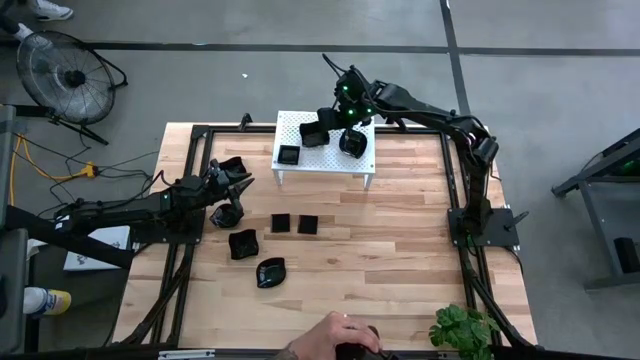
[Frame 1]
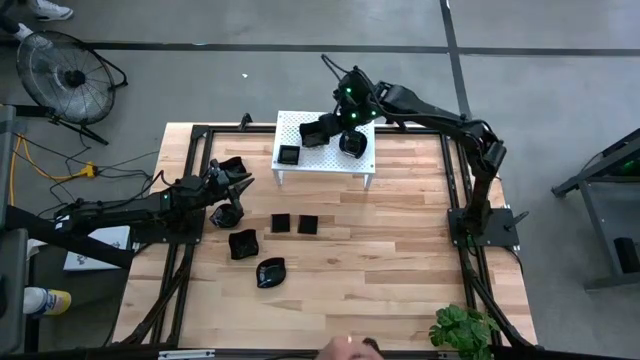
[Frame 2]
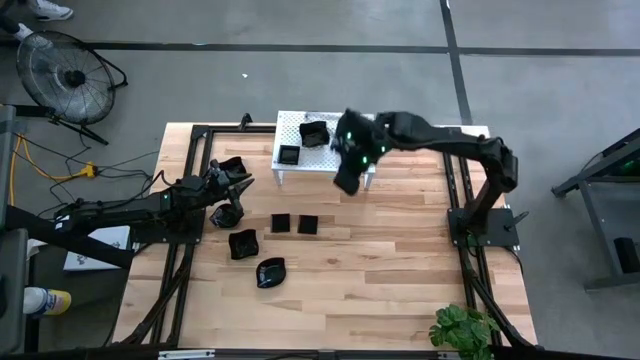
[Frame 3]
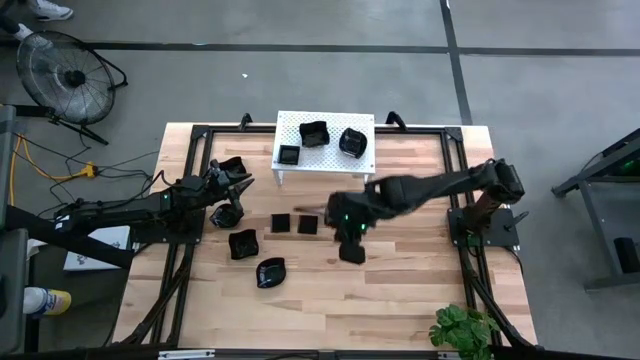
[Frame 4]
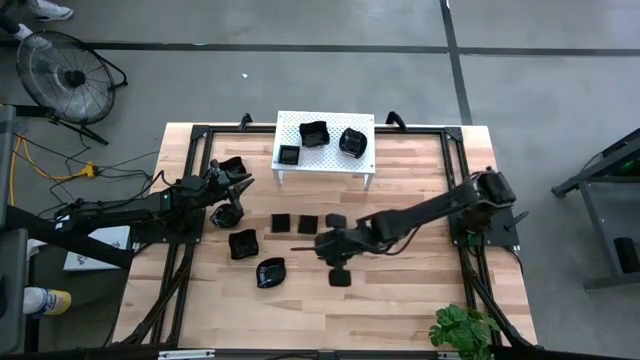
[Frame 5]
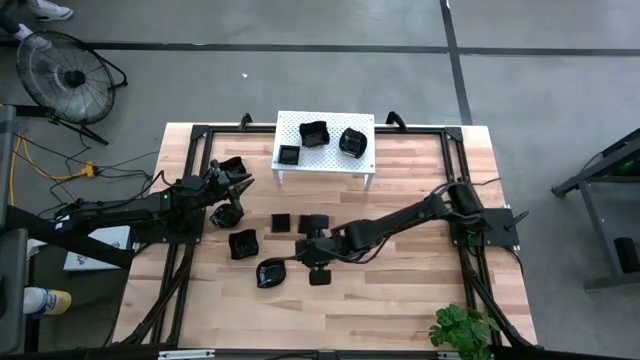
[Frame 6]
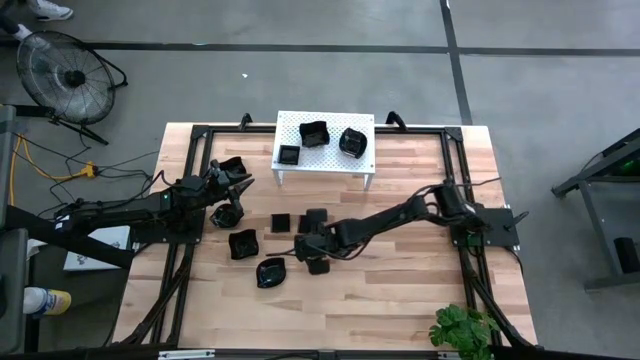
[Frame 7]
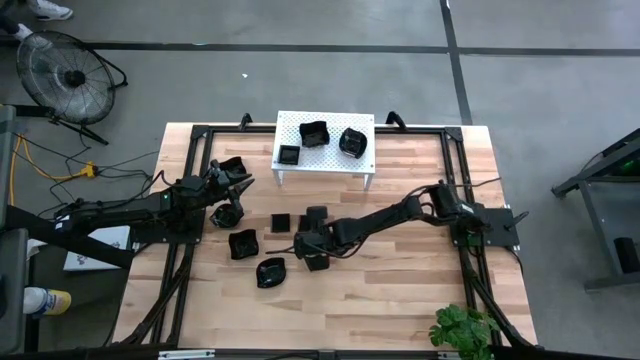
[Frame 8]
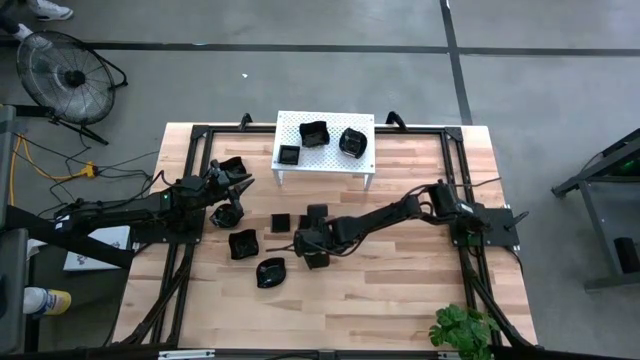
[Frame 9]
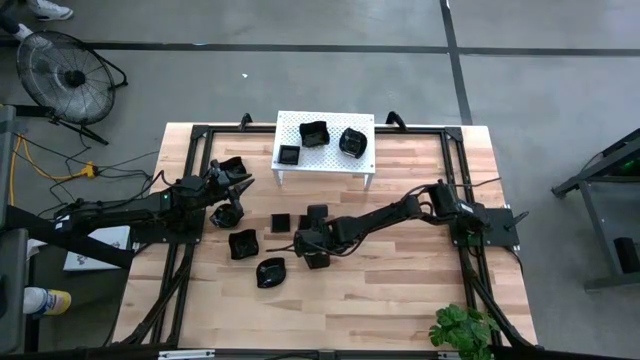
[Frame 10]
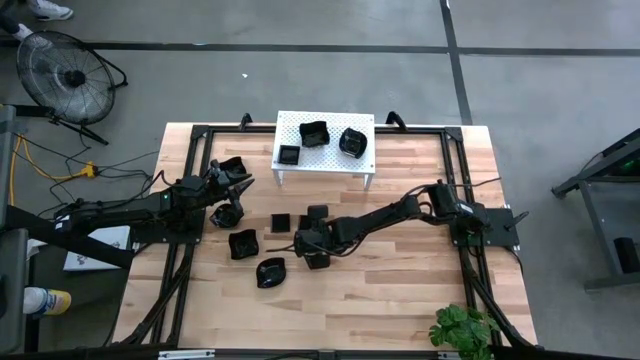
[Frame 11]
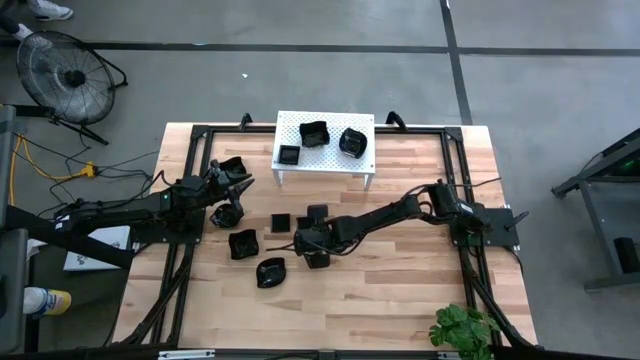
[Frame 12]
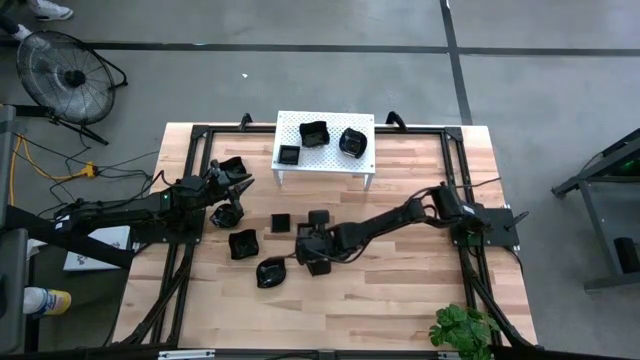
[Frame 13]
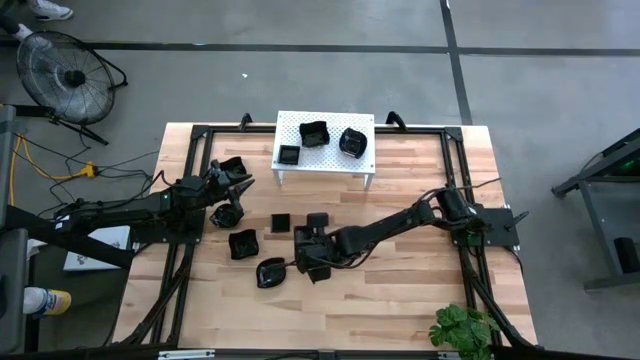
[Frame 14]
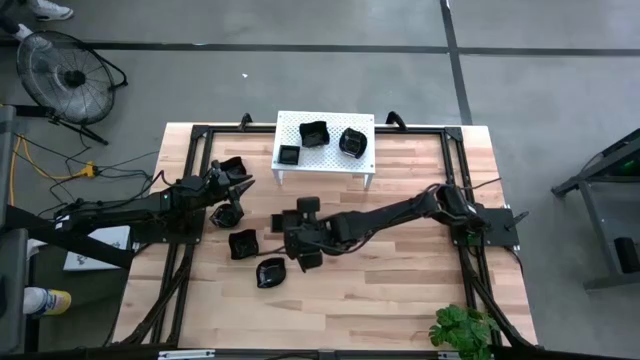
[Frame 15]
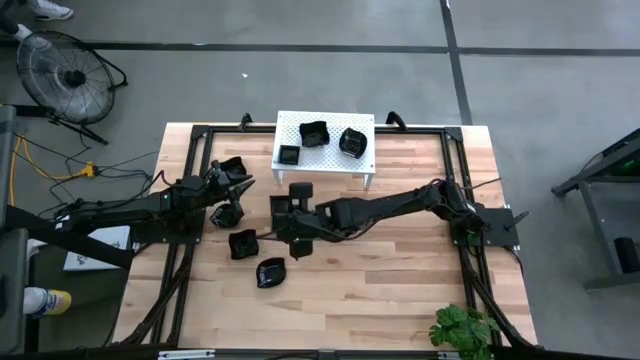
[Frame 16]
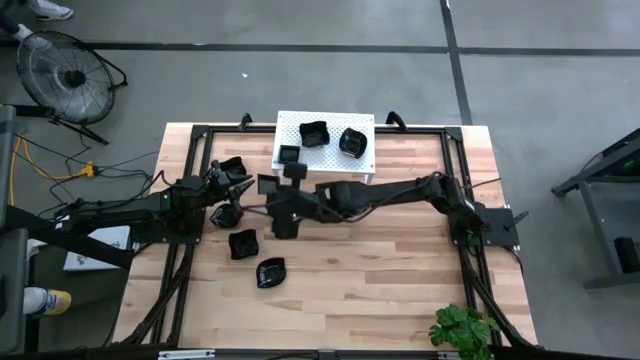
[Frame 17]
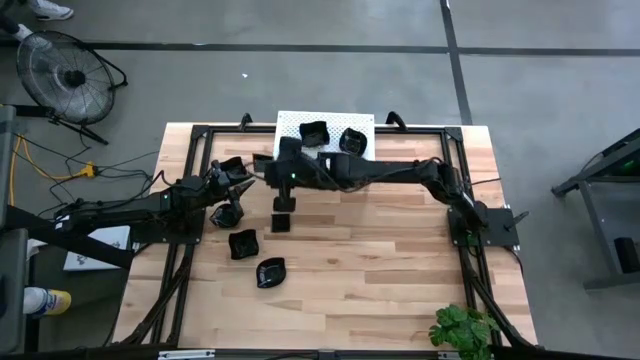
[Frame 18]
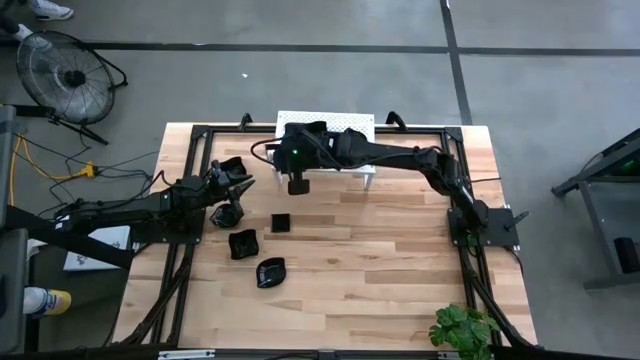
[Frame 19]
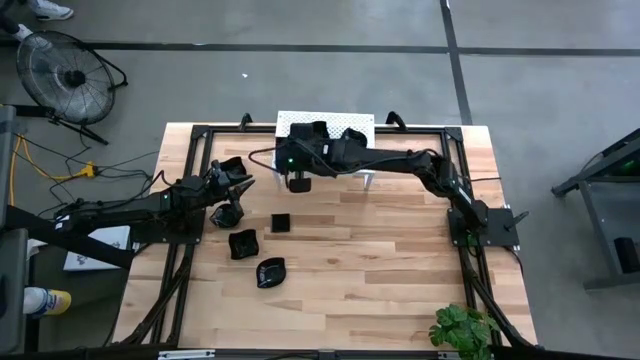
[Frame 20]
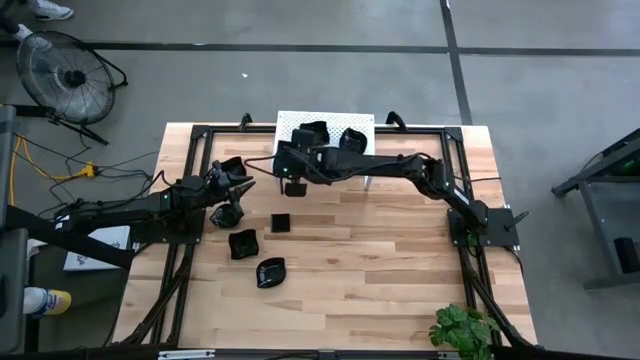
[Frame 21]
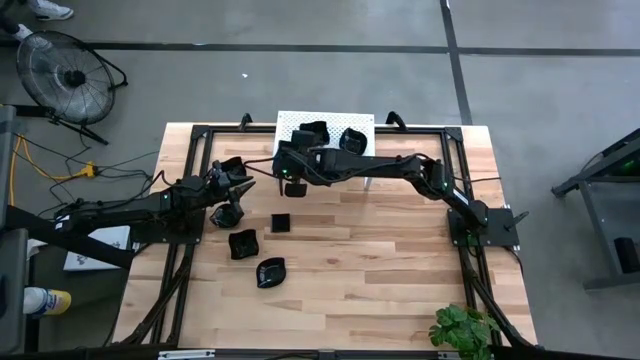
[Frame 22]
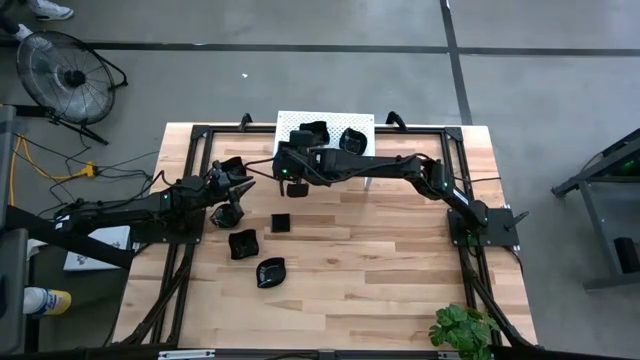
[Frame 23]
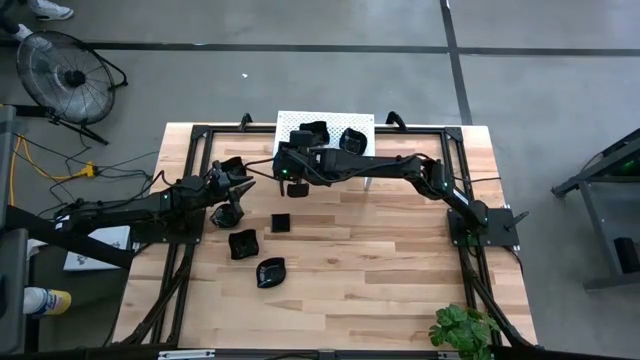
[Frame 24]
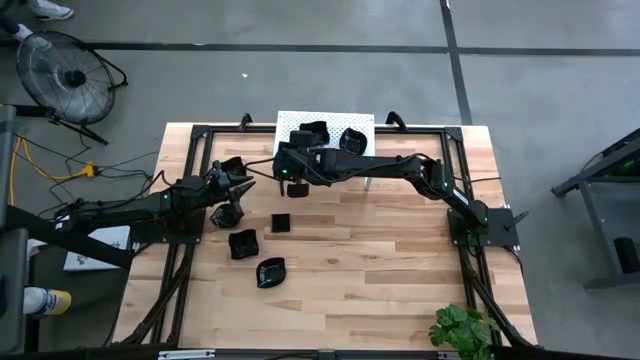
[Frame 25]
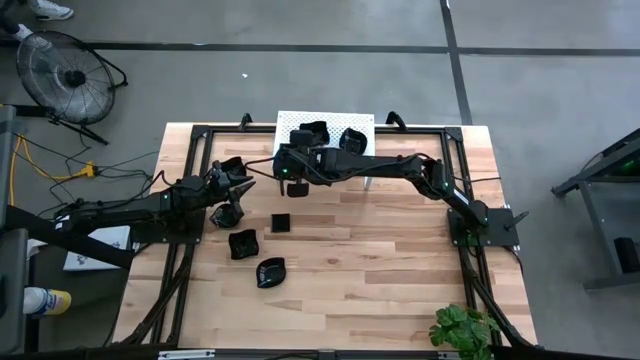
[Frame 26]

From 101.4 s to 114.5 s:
Task: Pick & Place Mini shaped plates
Stack the square plate on top of the other square plates on the shelf

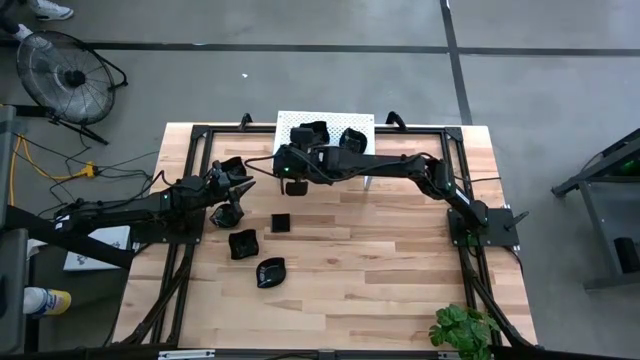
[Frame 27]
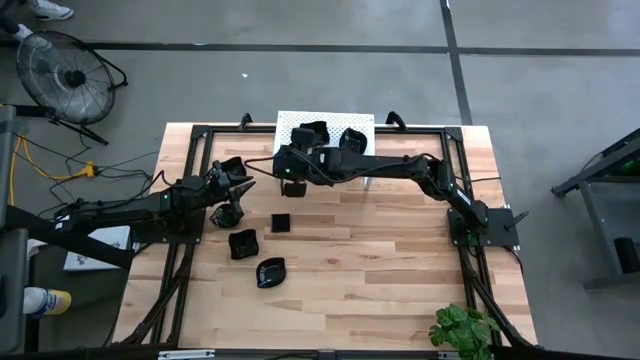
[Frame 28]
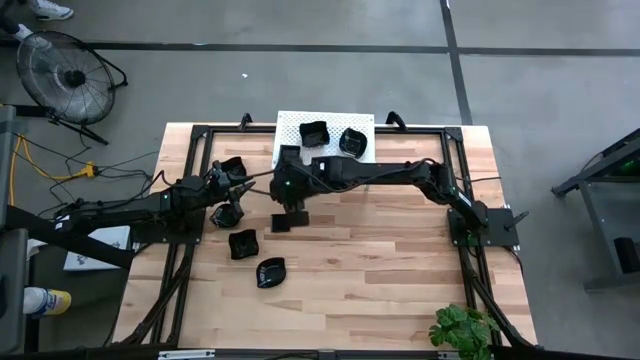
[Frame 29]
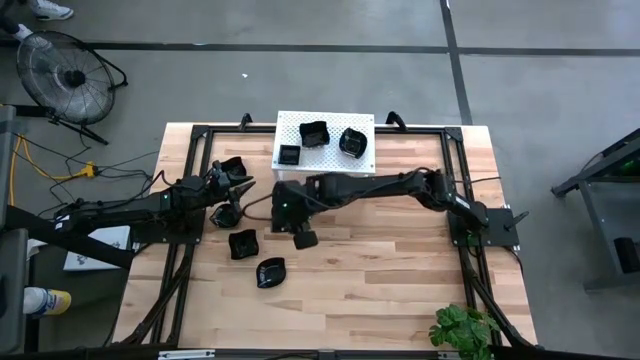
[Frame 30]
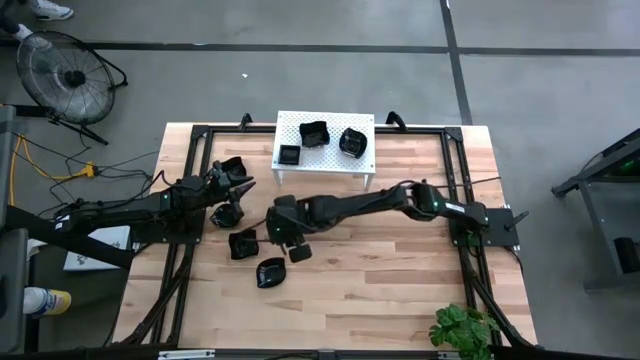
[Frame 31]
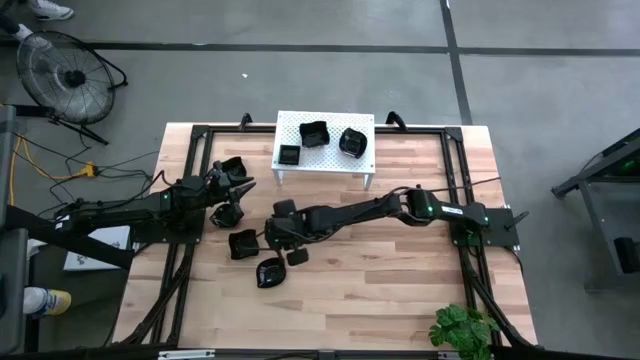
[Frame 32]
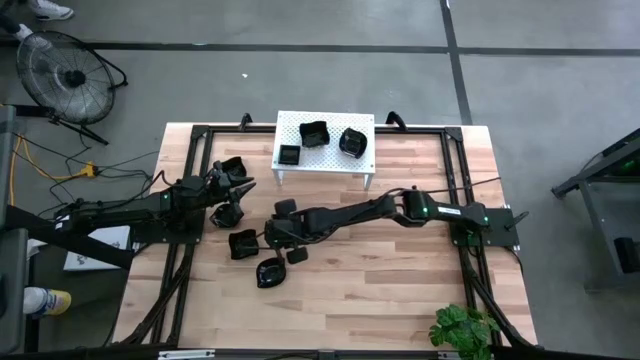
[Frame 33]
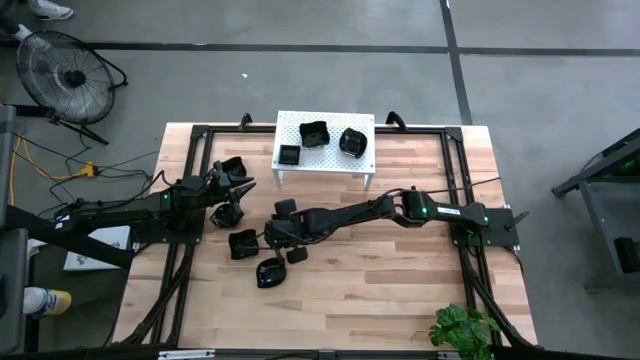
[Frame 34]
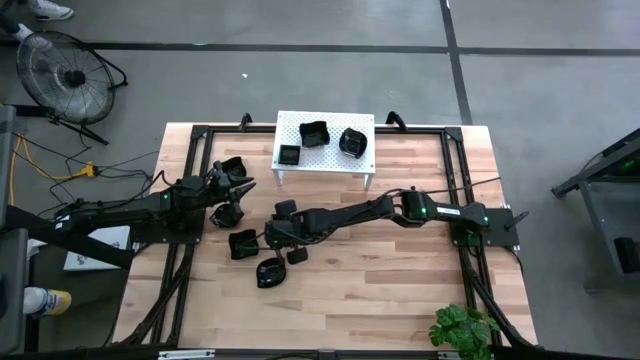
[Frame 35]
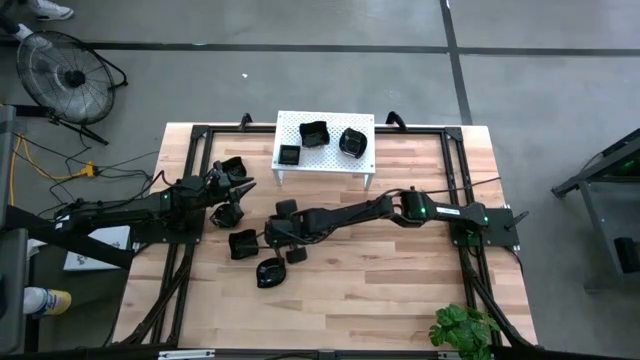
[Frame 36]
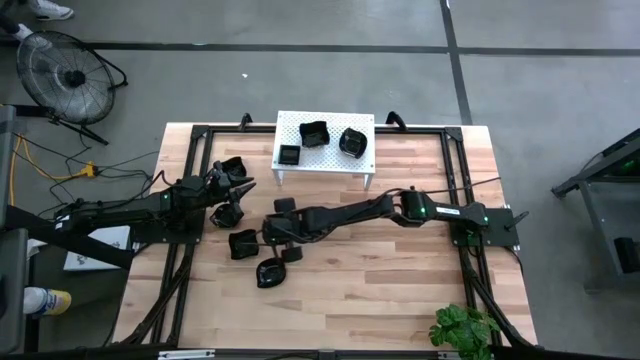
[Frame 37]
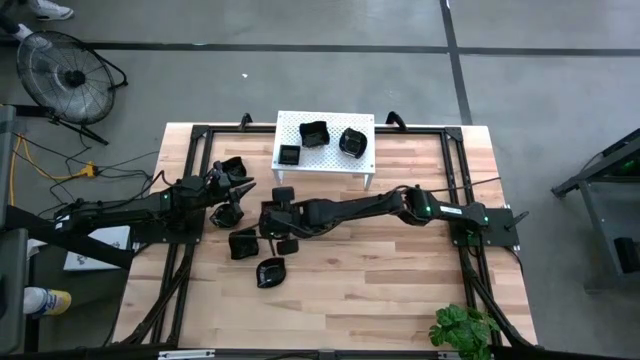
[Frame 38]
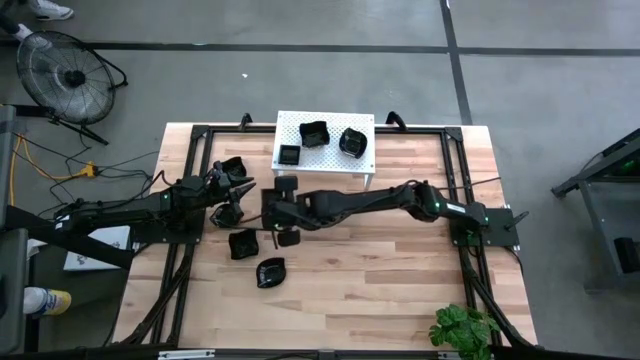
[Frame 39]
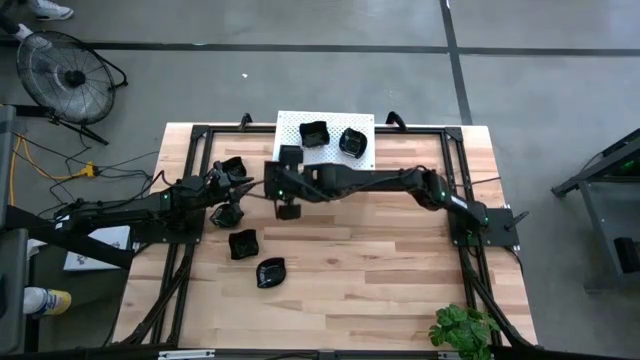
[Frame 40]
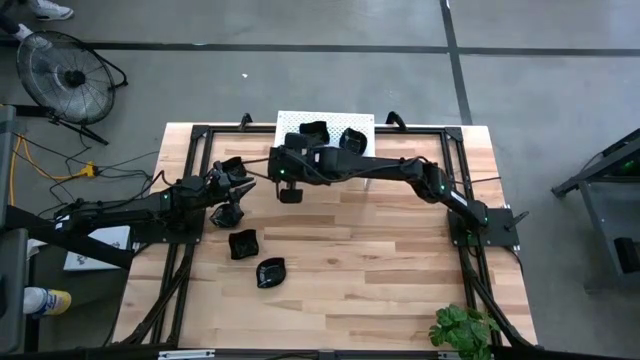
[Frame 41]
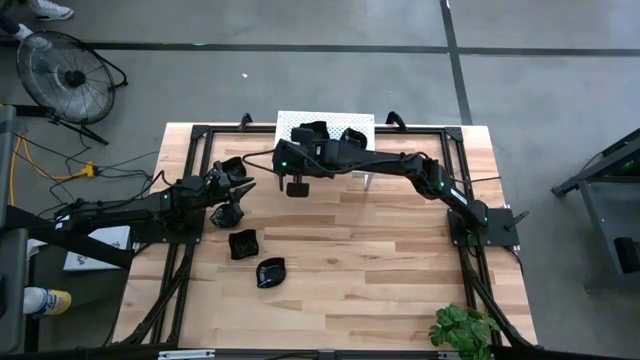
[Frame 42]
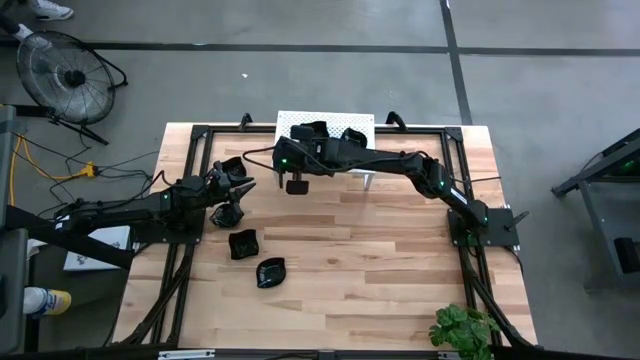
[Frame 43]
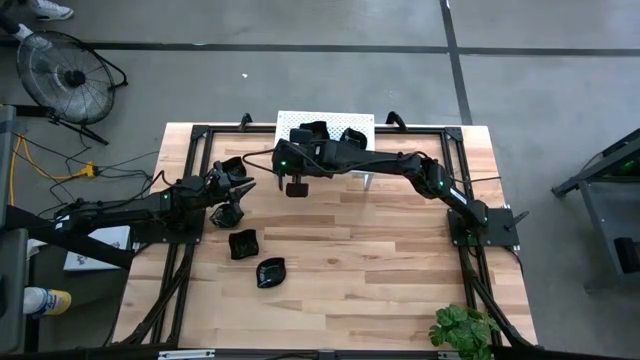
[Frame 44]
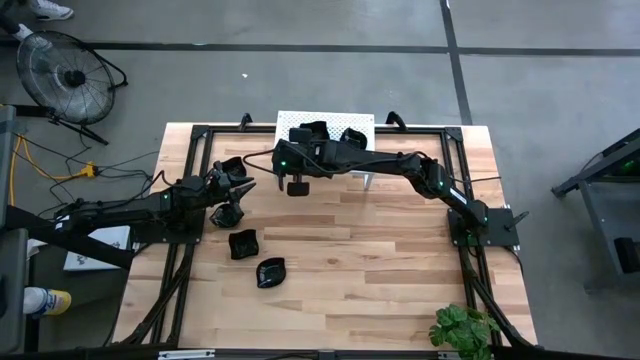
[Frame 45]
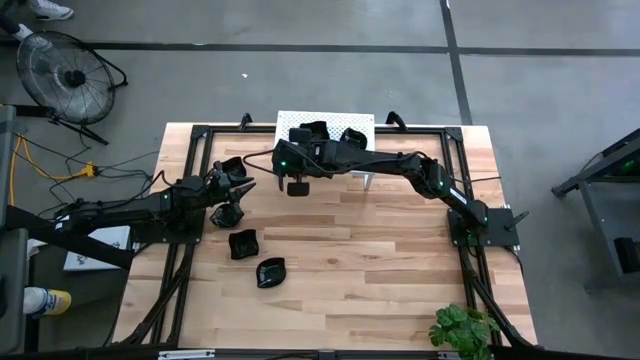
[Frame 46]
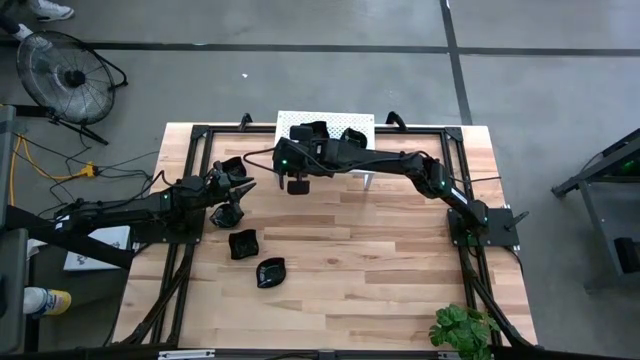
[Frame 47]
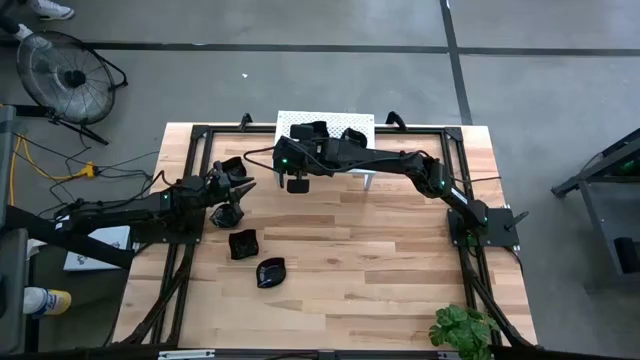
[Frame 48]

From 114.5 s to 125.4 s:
Stack the square plate on top of the other square plates on the shelf
